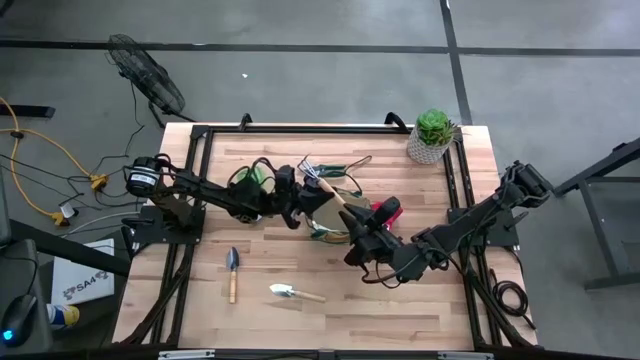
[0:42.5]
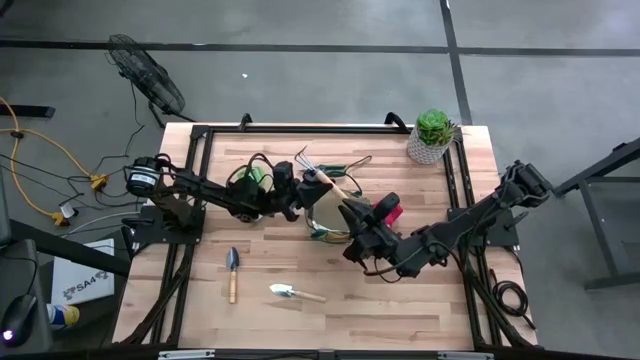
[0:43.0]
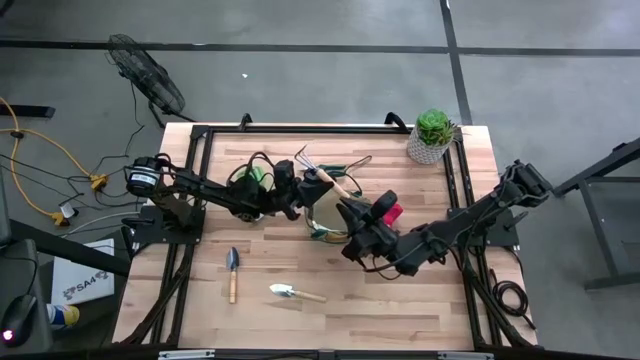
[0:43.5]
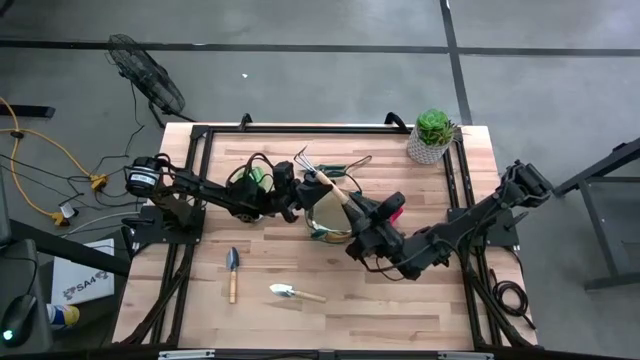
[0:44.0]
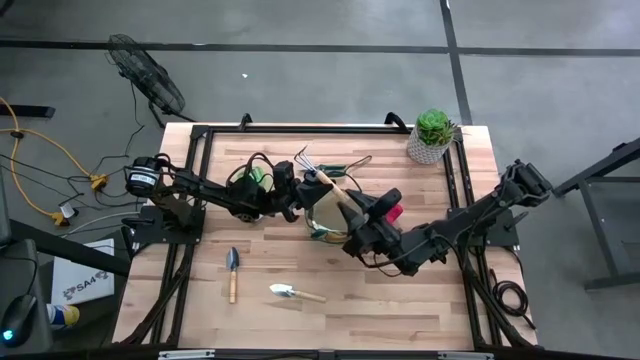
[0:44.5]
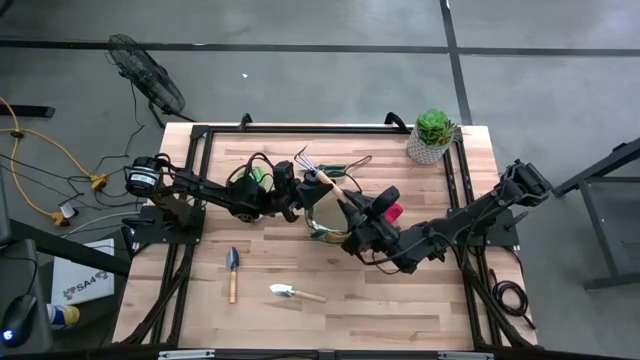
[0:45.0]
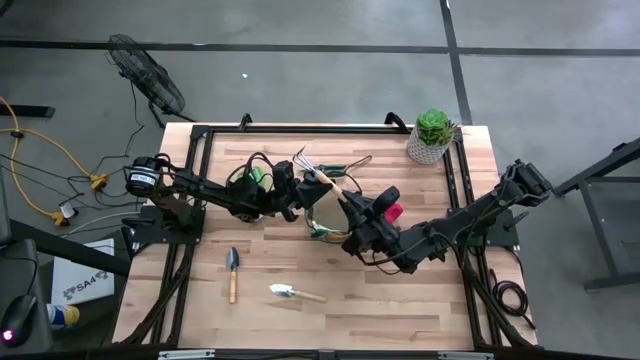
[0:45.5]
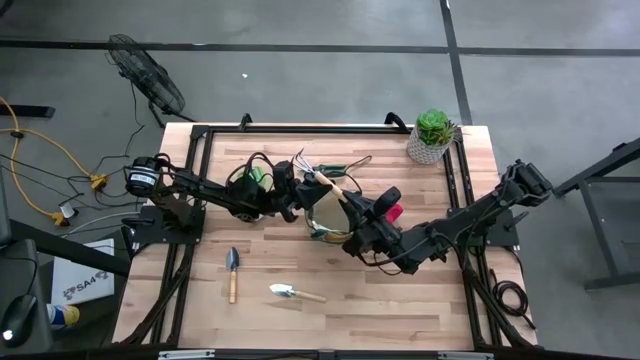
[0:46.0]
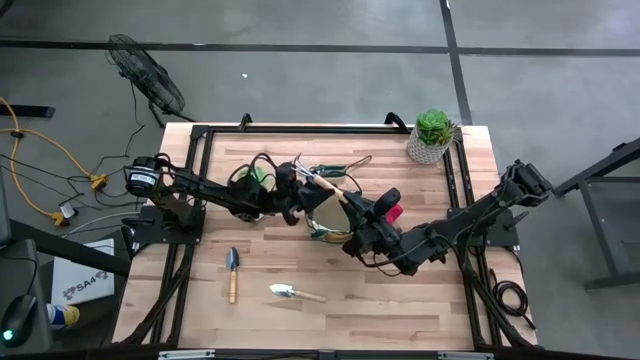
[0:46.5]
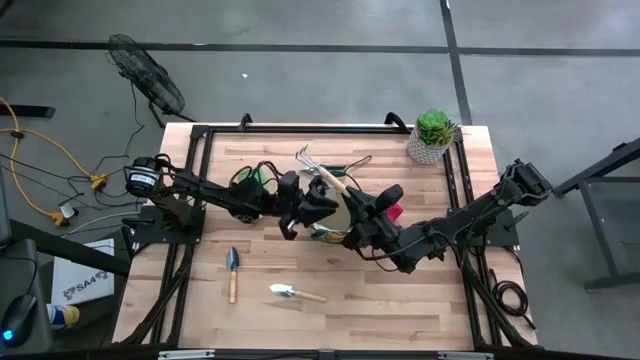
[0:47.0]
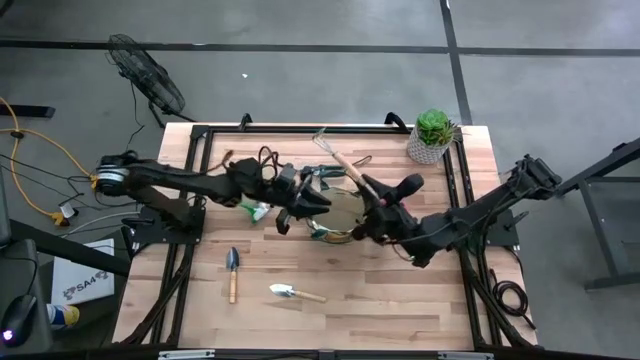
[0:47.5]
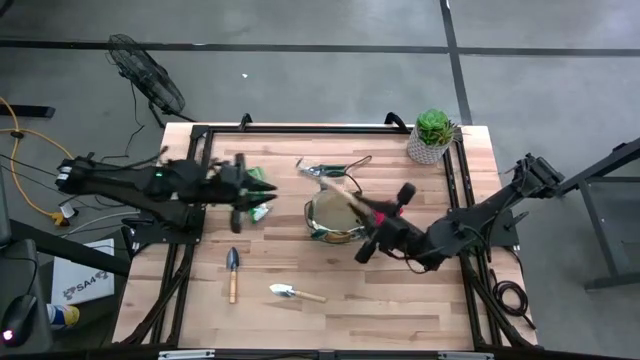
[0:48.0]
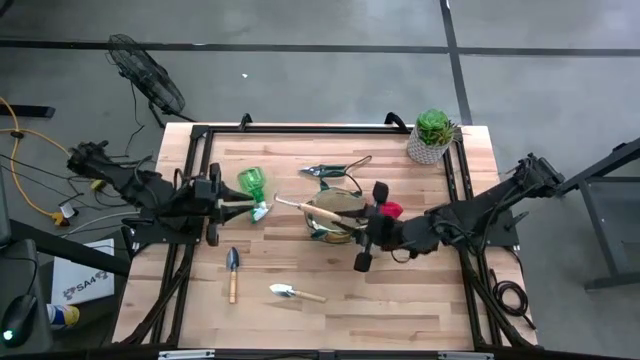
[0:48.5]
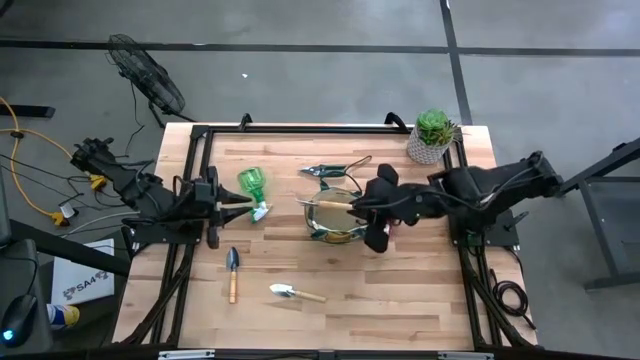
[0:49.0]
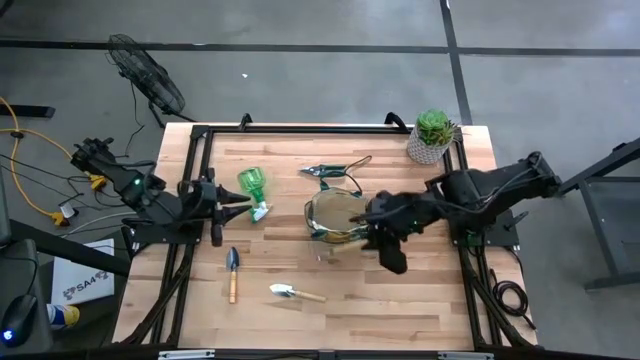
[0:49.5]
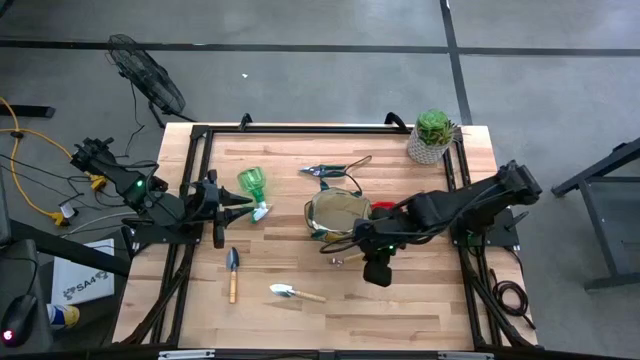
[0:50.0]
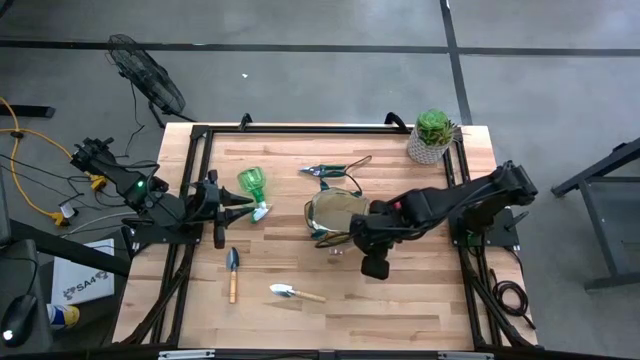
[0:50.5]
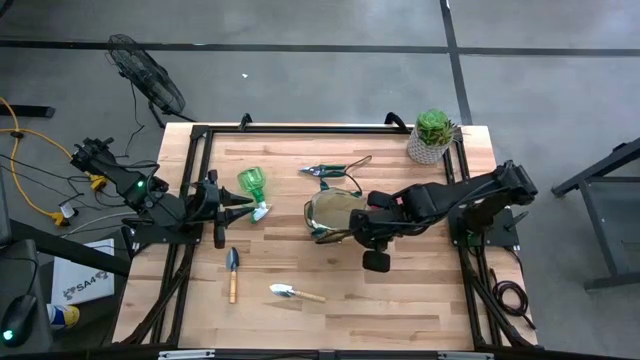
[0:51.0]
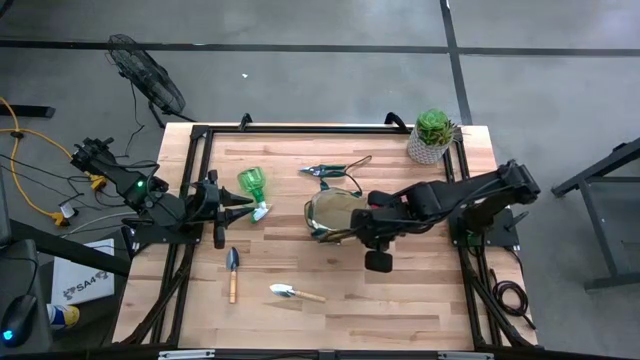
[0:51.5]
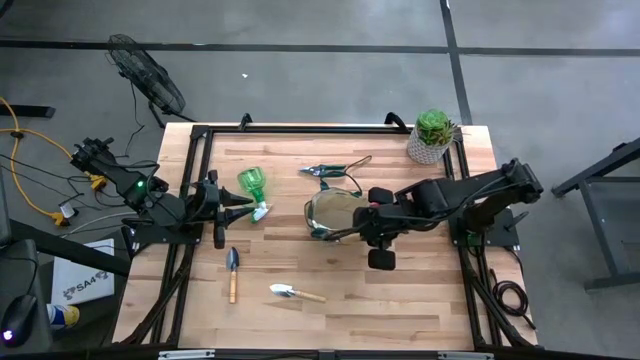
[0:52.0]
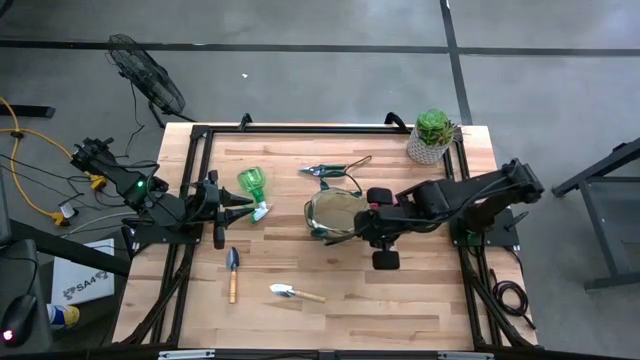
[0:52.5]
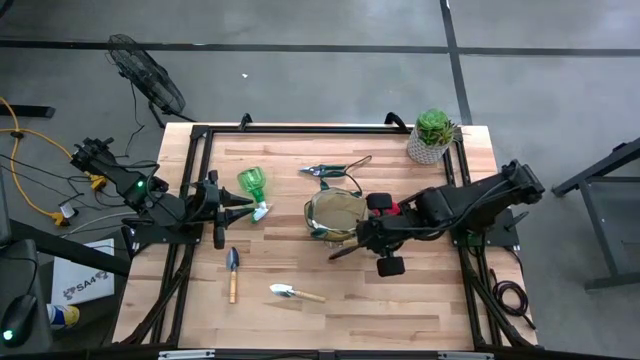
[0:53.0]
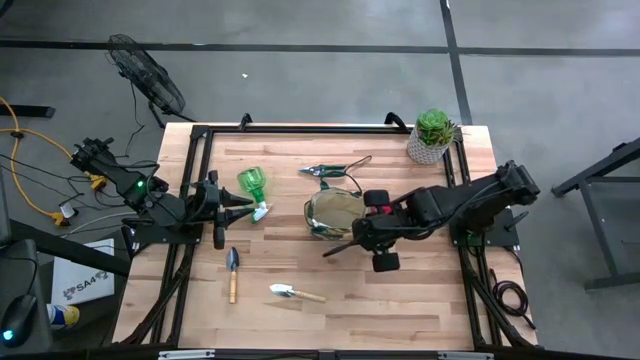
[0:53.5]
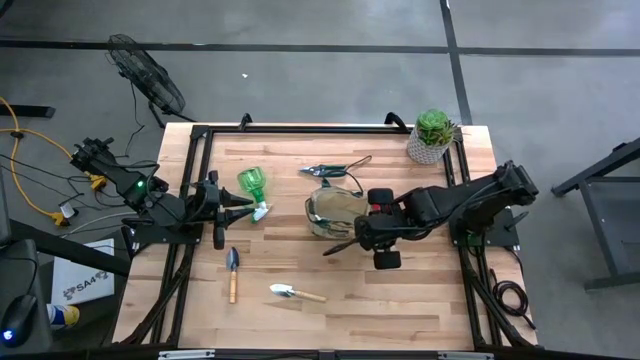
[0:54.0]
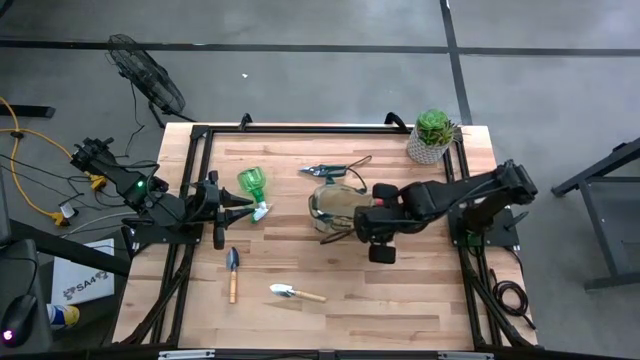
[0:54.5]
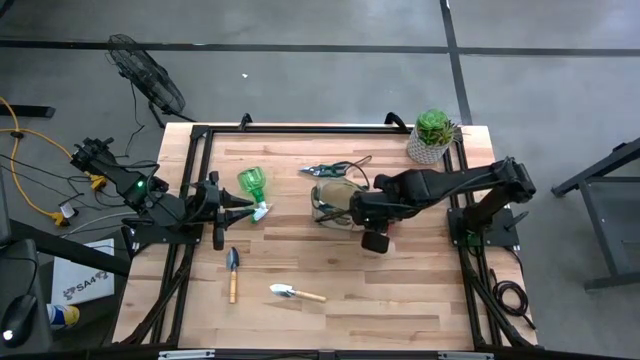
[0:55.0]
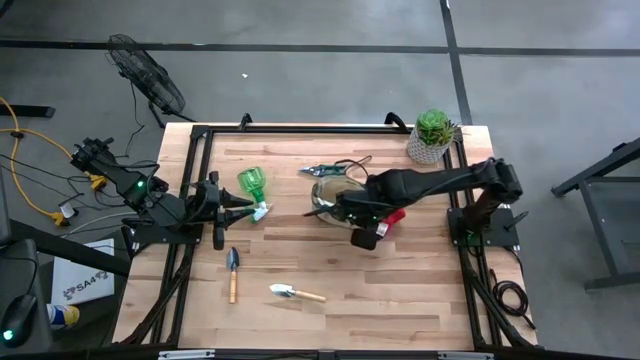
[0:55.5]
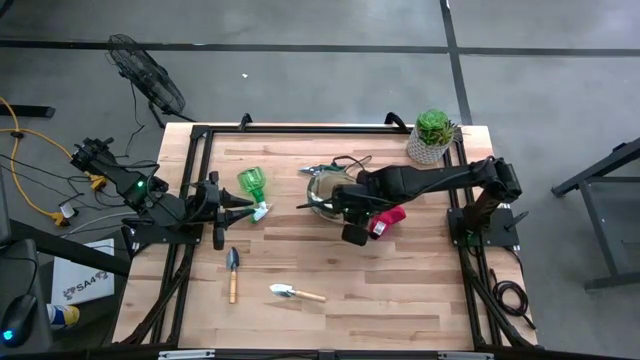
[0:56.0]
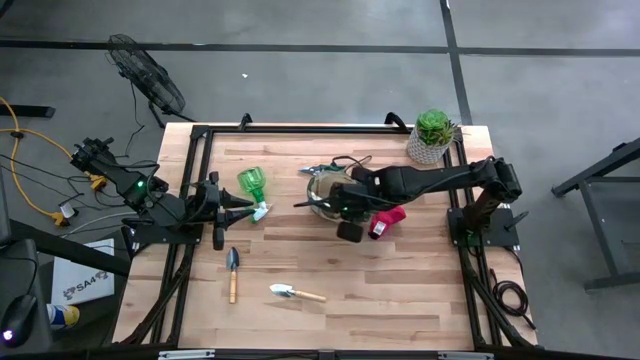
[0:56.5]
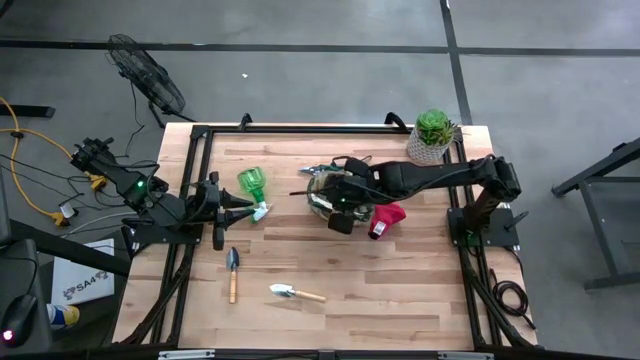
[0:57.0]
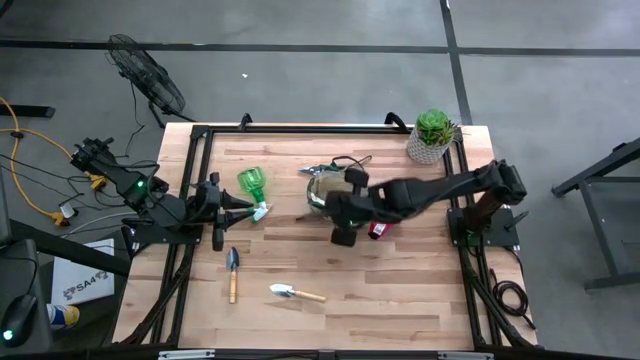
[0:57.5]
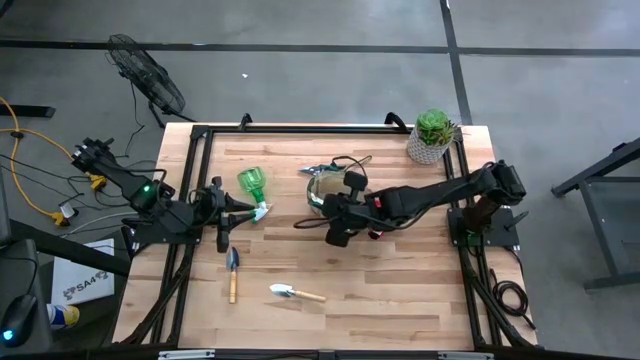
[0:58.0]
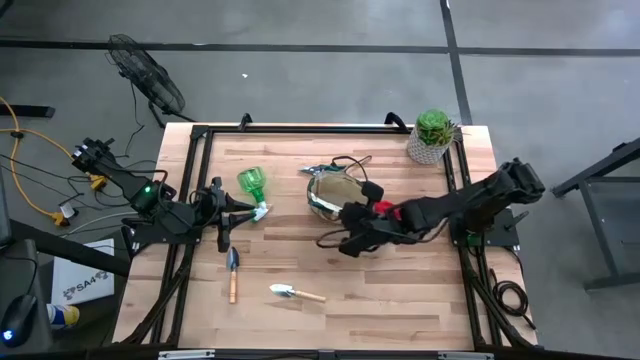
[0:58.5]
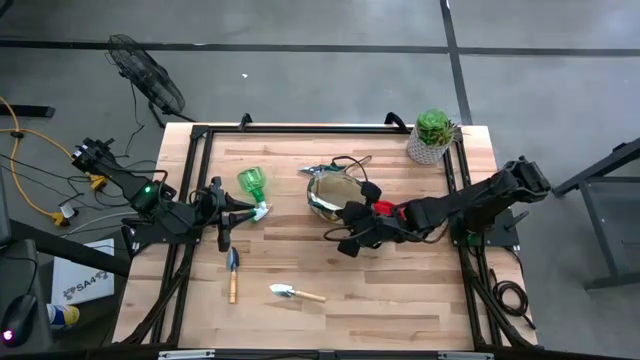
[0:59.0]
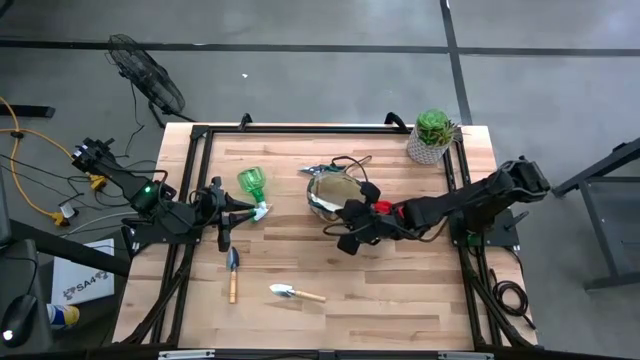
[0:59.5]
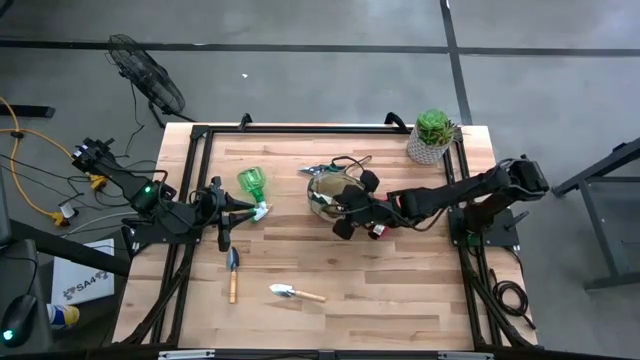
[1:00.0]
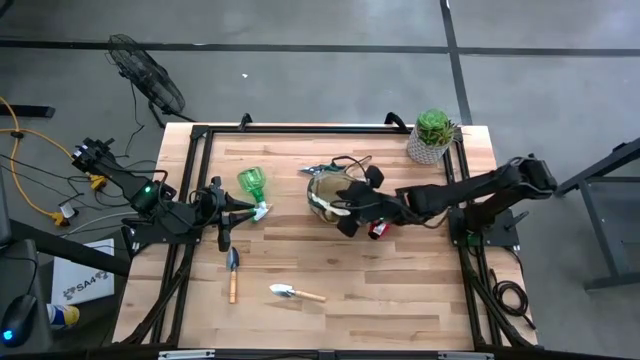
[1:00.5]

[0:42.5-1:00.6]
Task: Pick & Place Garden tools in Gardening bag
Put the brown hand rake into the gardening bag
